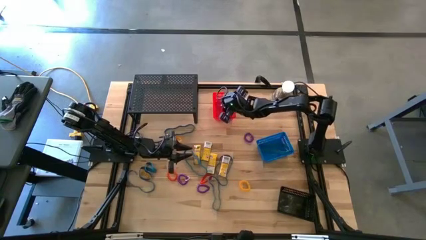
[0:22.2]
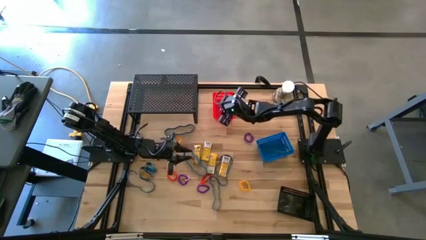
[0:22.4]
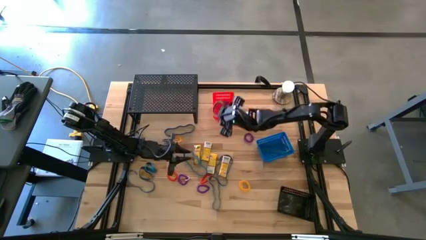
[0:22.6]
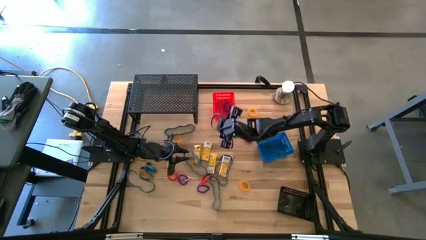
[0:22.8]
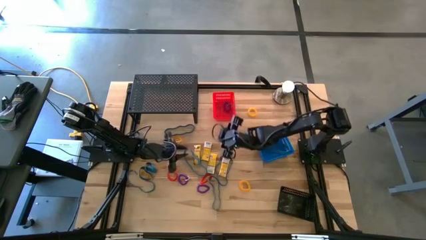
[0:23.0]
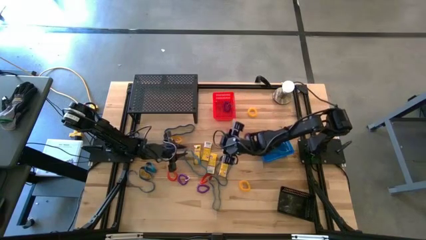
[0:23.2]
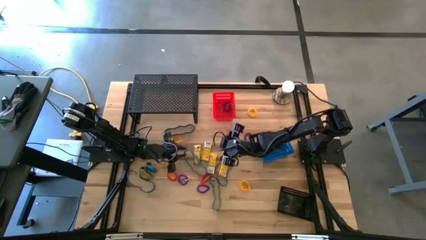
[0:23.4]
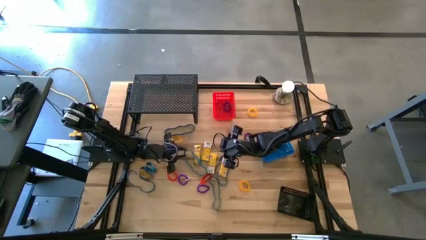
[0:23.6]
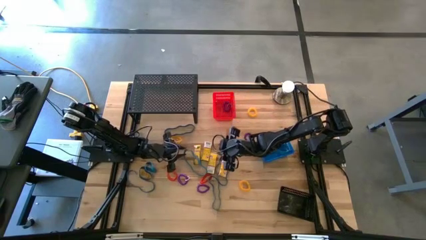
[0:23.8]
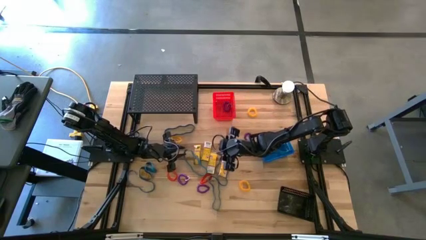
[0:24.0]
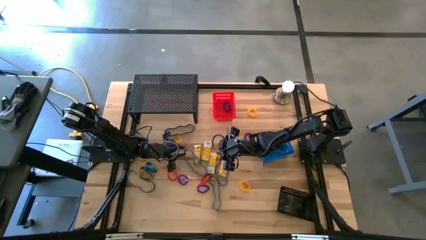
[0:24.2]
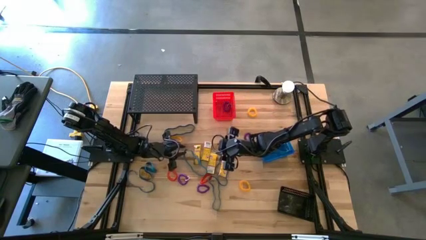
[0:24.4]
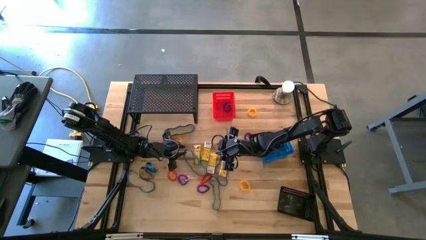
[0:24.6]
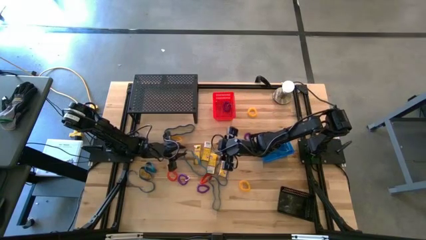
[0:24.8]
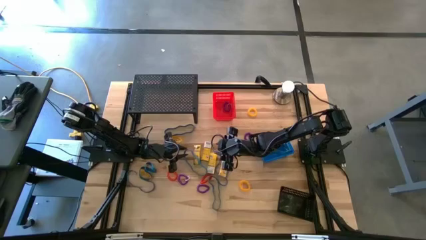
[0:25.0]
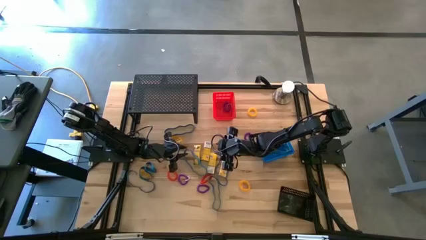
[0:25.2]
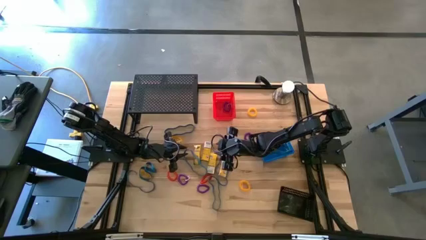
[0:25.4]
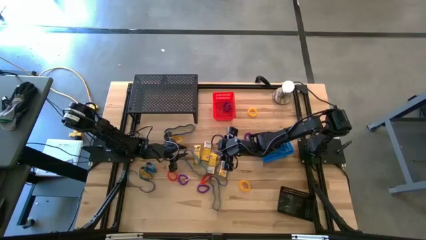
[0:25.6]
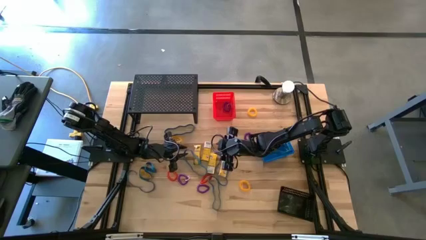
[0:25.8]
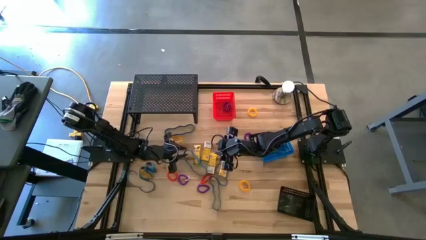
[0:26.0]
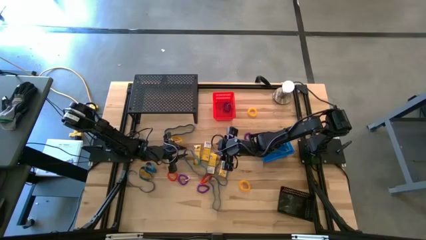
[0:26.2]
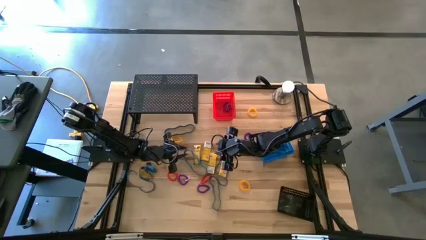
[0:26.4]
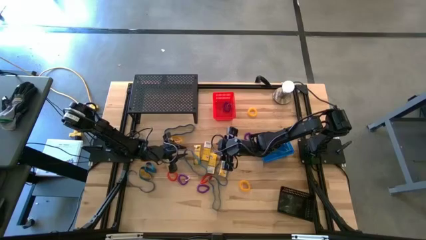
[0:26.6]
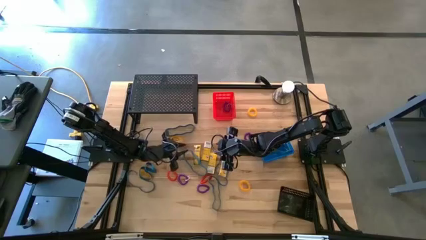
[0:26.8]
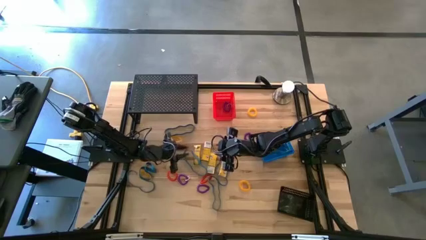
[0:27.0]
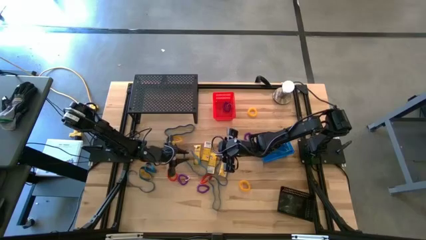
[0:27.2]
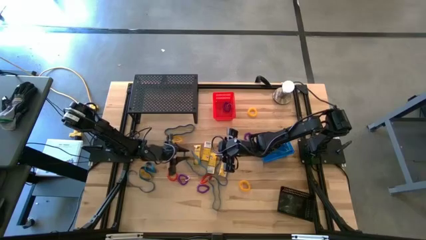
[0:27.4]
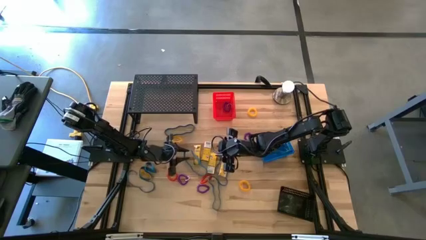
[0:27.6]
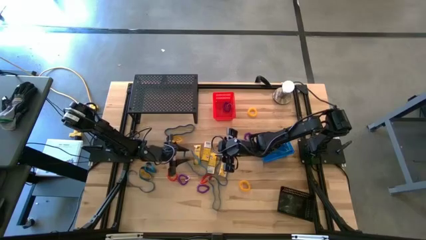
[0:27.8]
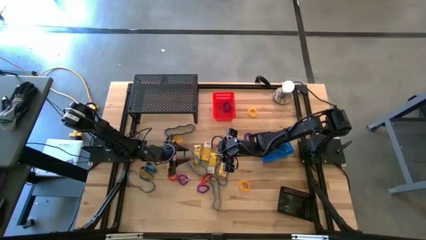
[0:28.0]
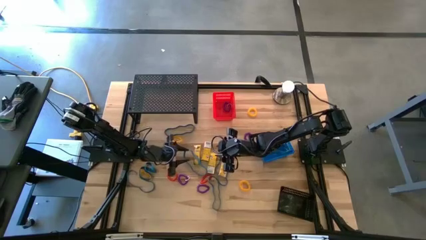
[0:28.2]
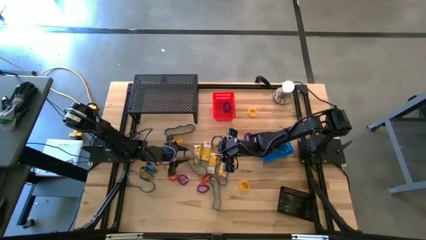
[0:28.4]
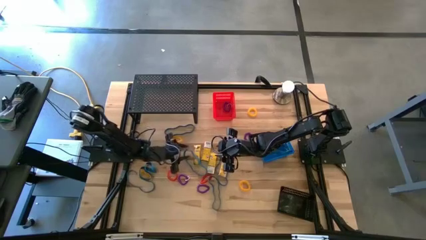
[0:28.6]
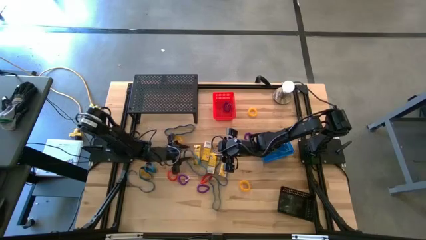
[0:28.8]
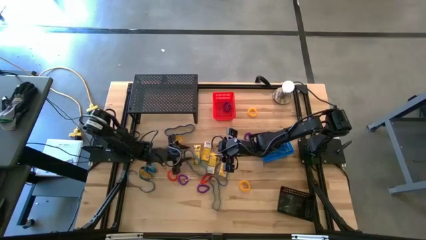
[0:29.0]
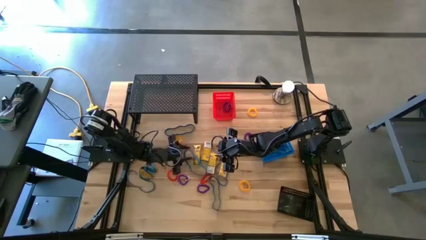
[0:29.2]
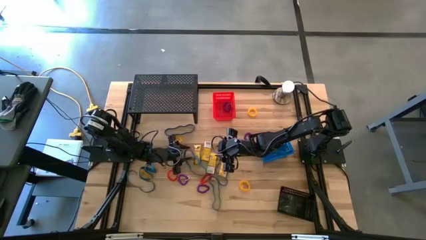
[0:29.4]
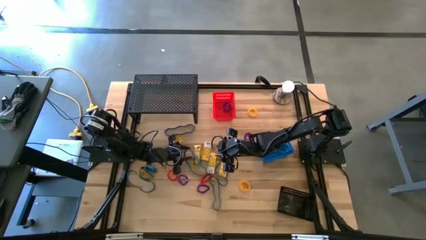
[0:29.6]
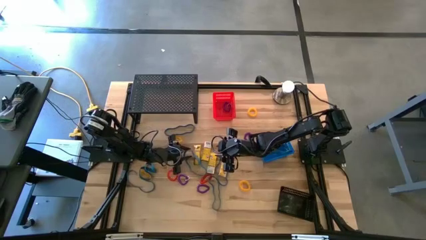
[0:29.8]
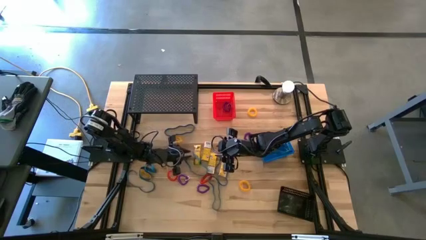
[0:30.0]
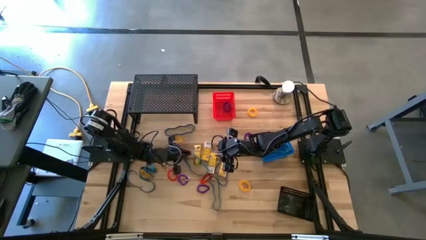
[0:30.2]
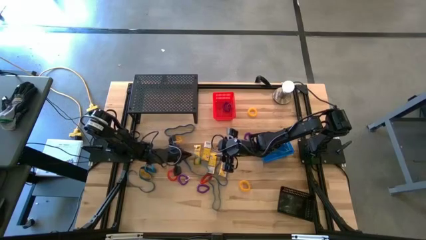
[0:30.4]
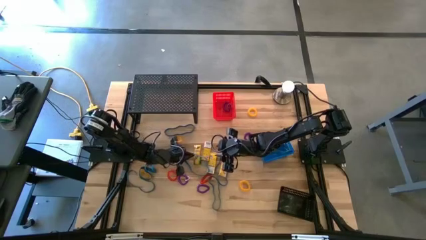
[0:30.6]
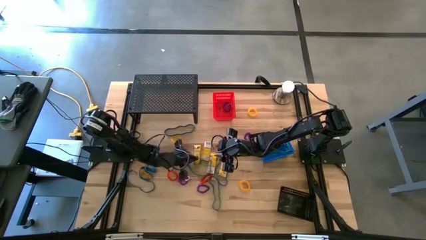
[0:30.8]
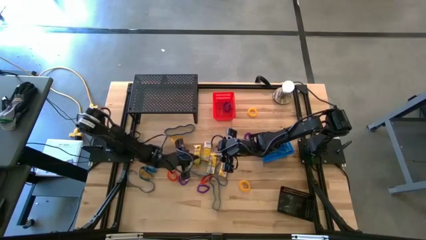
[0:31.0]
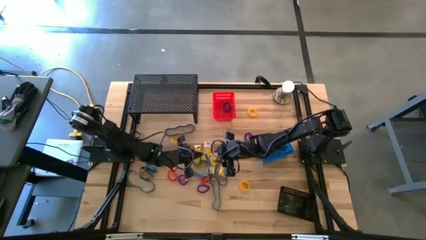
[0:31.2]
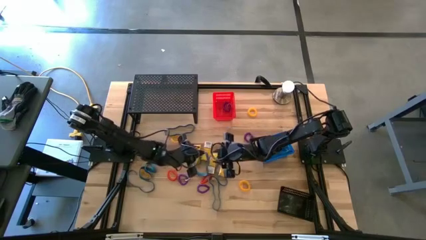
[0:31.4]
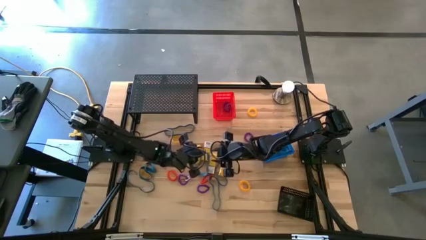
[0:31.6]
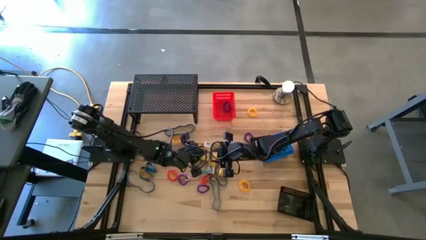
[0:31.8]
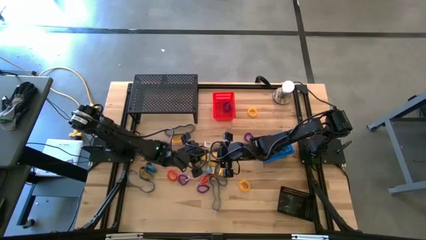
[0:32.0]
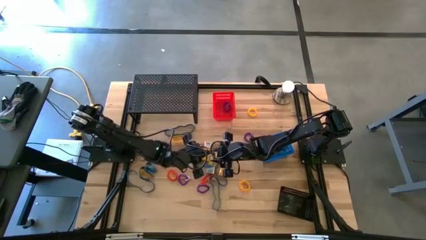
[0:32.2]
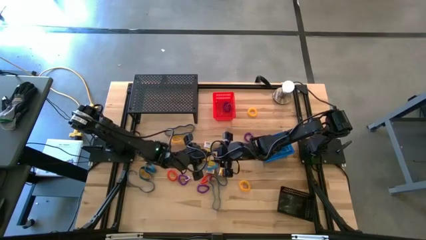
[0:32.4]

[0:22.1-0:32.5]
Task: Pick & Place Office Desk Supplies
Put the blue rubber band into the blue bin

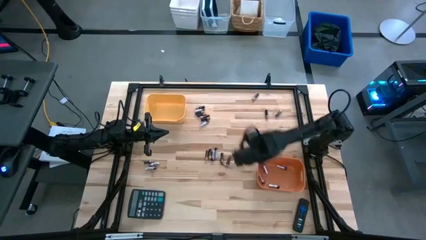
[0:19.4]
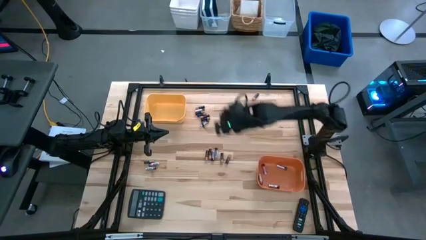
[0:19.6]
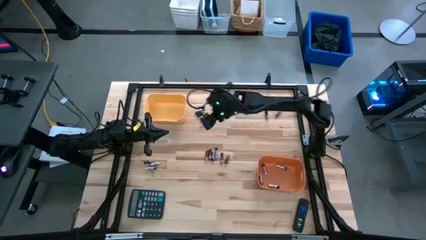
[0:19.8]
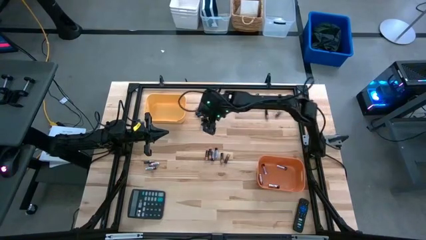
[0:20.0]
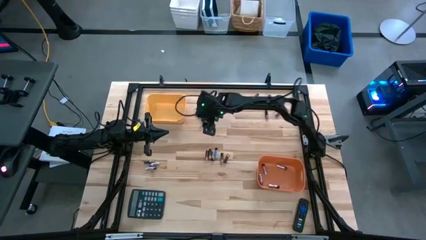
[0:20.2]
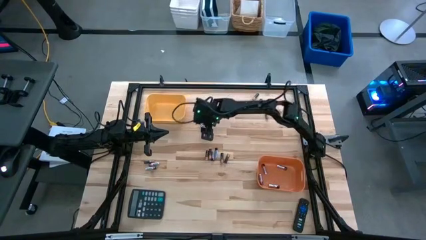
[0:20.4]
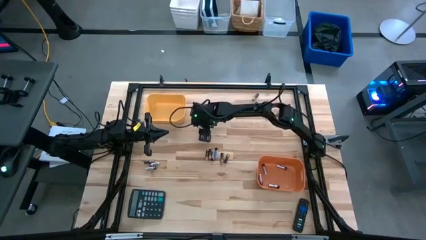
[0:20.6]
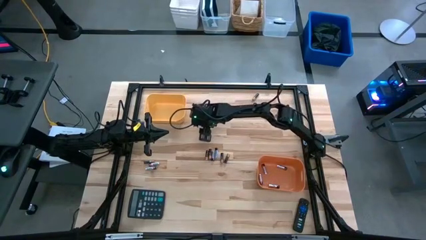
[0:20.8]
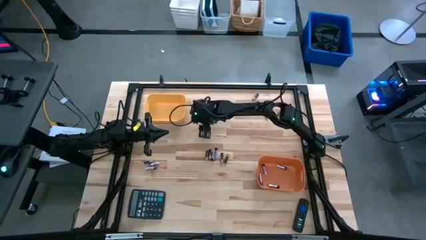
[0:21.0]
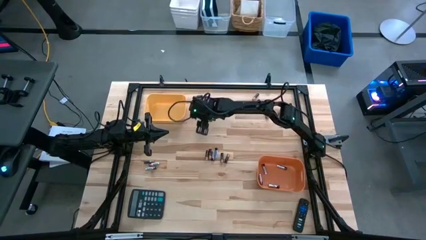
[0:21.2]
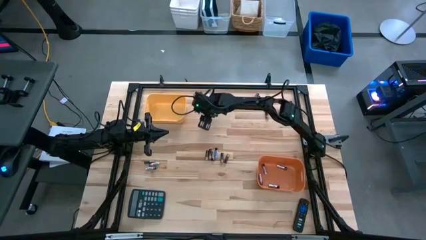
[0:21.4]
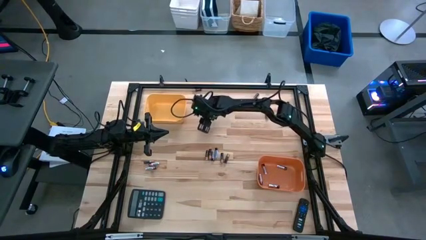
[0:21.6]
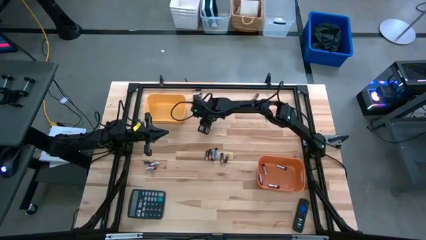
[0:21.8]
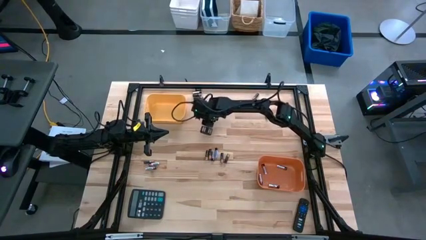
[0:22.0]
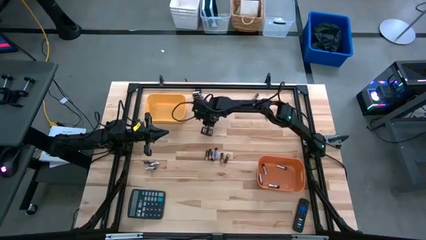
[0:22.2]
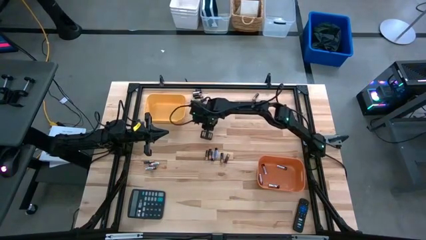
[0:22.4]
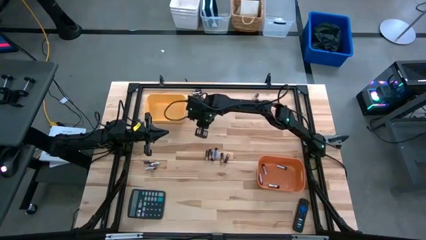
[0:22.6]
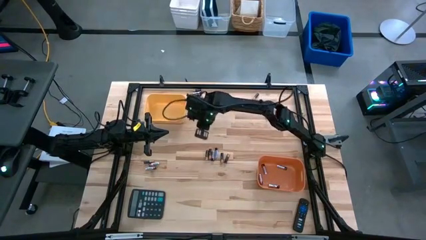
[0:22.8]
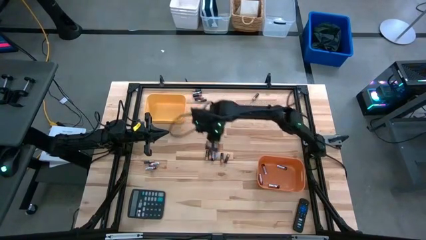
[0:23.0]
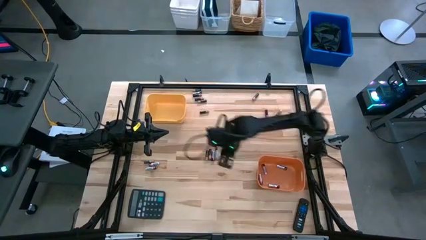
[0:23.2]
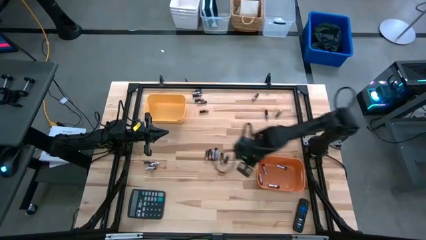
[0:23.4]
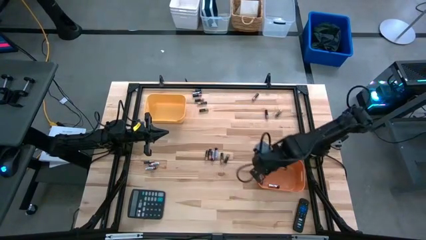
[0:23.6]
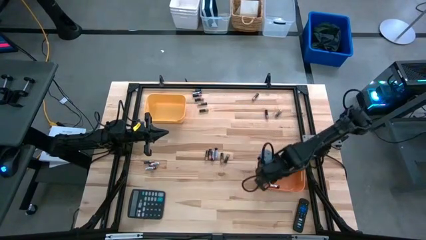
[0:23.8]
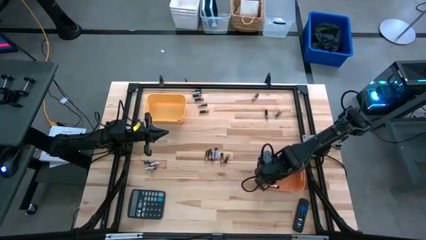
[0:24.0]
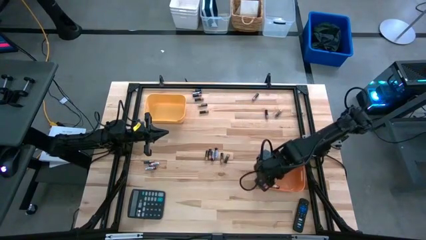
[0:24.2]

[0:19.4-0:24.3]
Task: Sort batteries
Put the silver battery into the orange bin

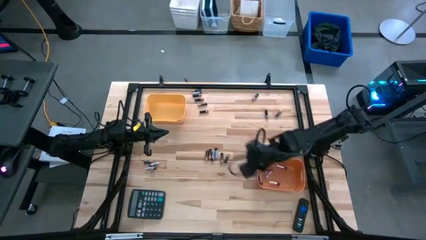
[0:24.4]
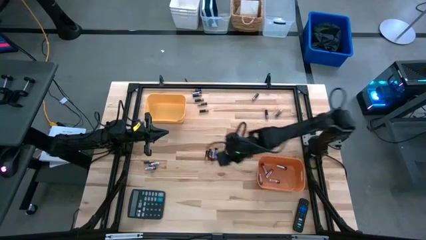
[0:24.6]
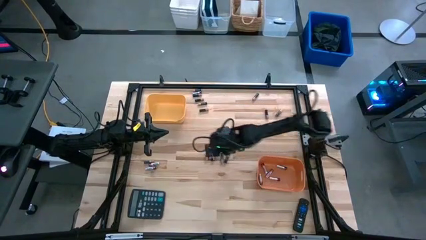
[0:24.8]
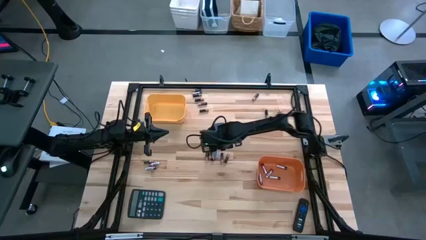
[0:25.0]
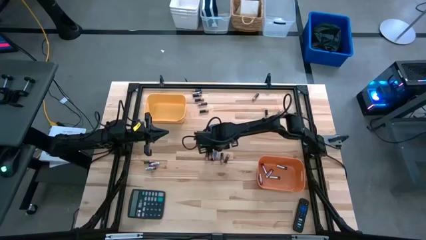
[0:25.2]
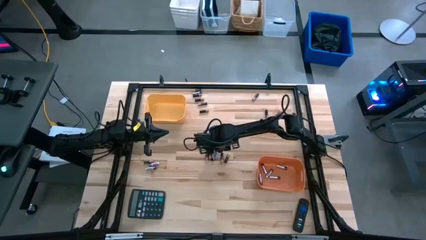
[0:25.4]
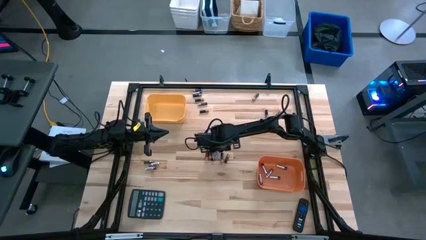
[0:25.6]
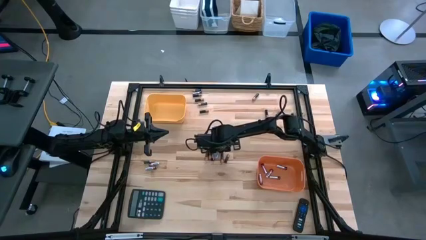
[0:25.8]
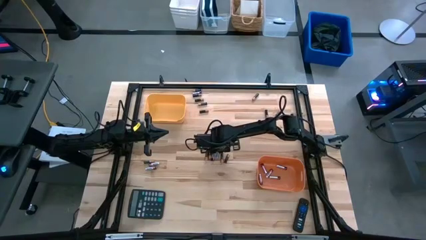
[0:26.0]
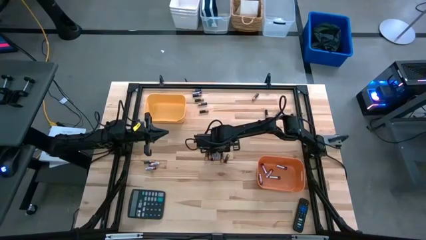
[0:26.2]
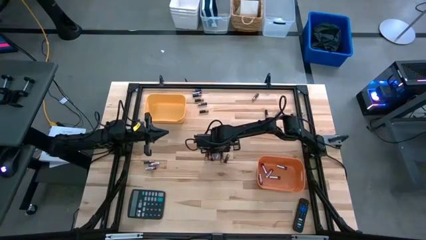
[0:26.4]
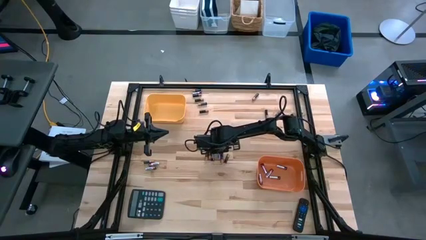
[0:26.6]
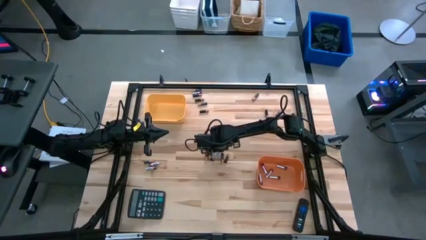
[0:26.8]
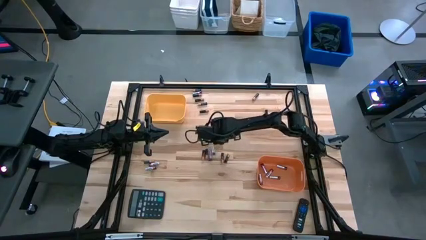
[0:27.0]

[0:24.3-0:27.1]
Put the silver battery into the orange bin
